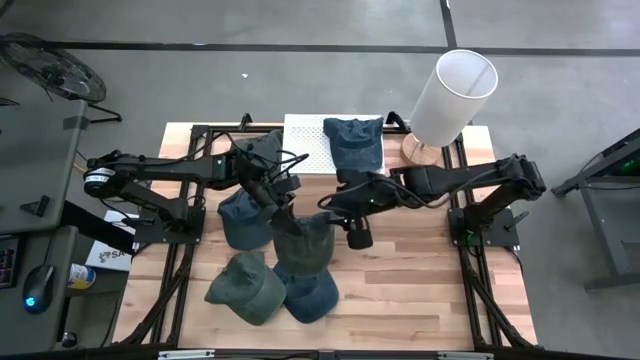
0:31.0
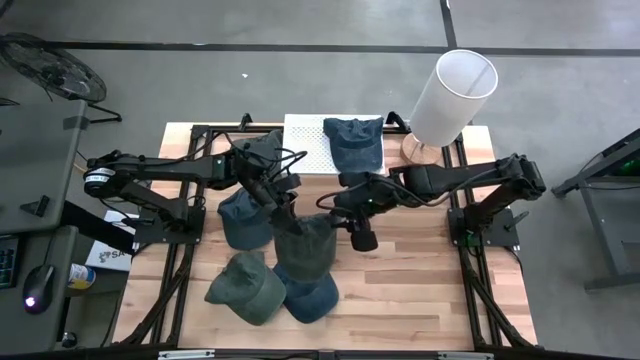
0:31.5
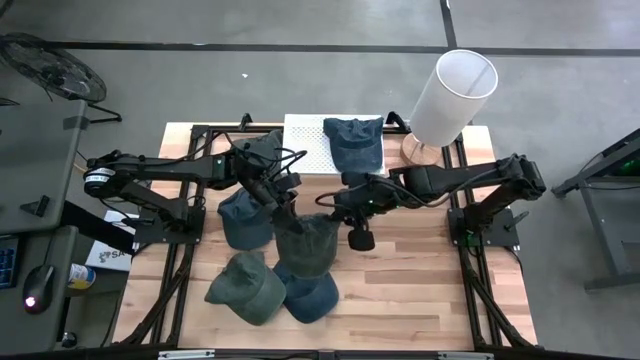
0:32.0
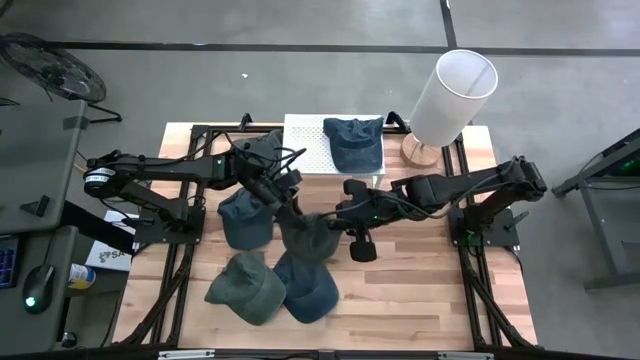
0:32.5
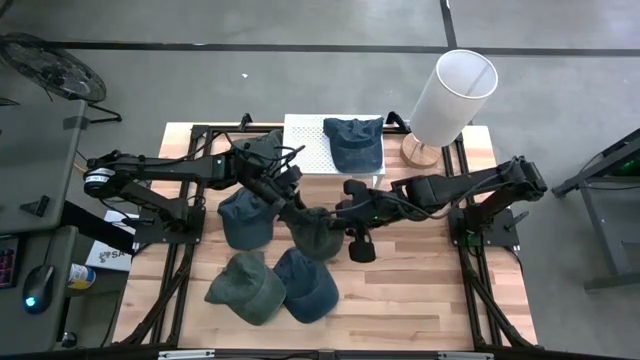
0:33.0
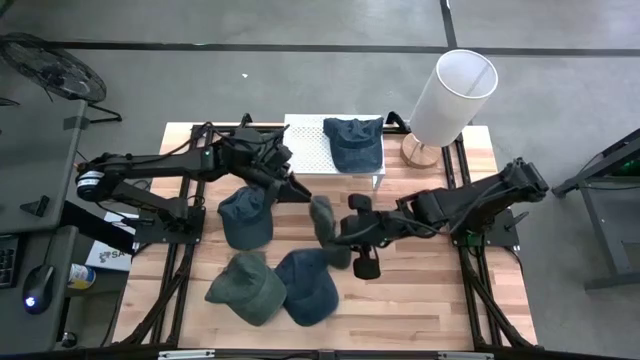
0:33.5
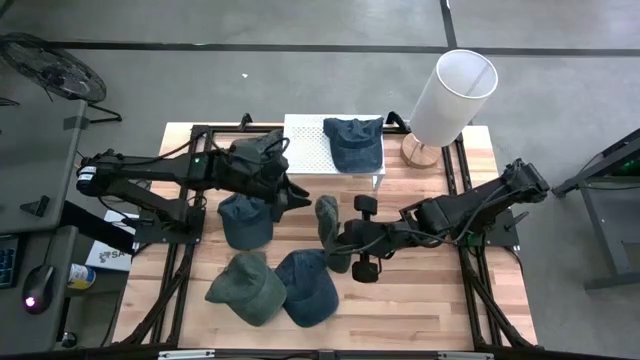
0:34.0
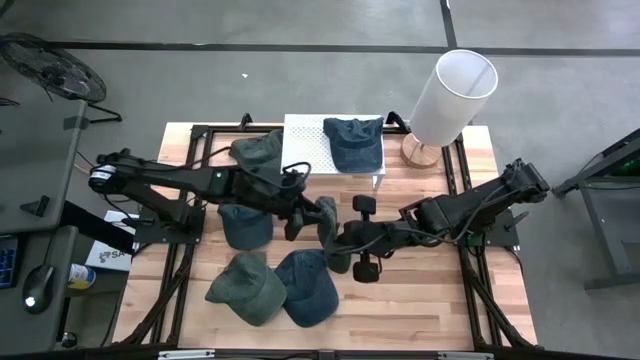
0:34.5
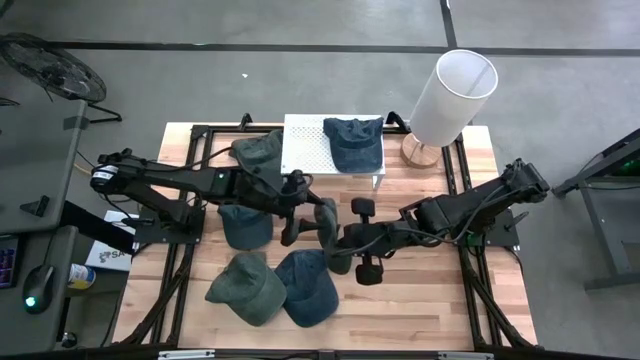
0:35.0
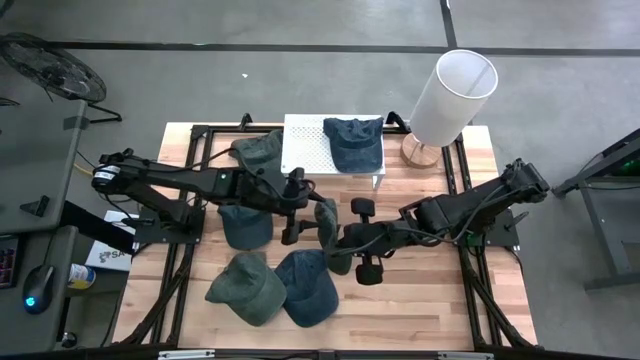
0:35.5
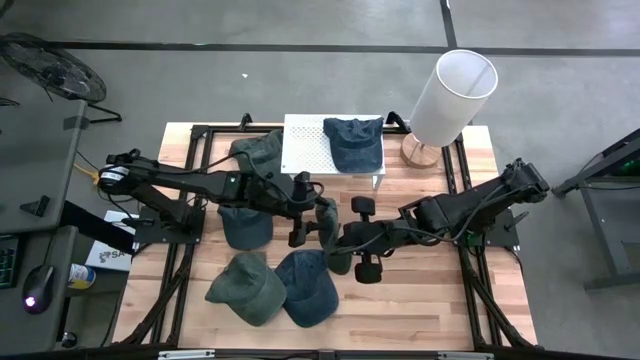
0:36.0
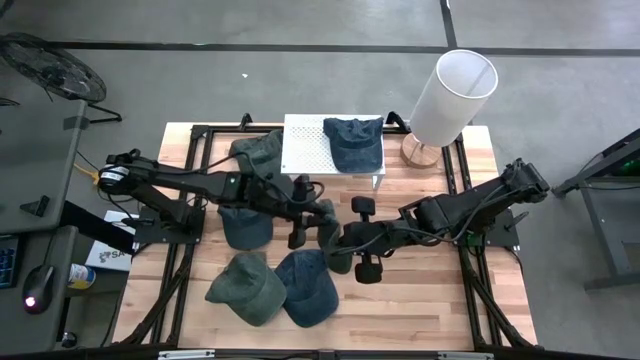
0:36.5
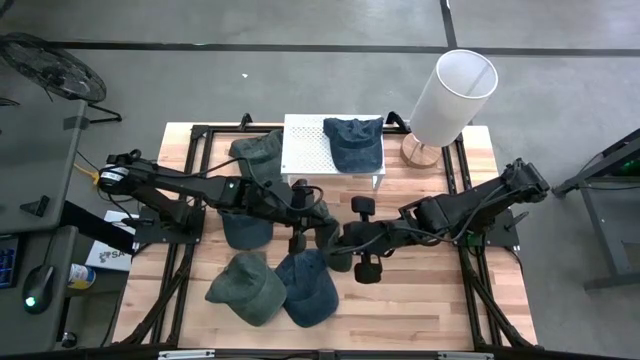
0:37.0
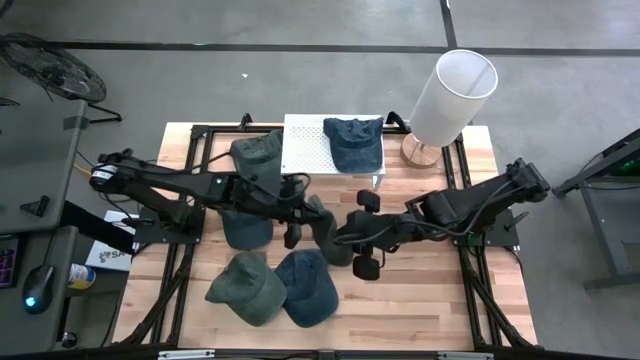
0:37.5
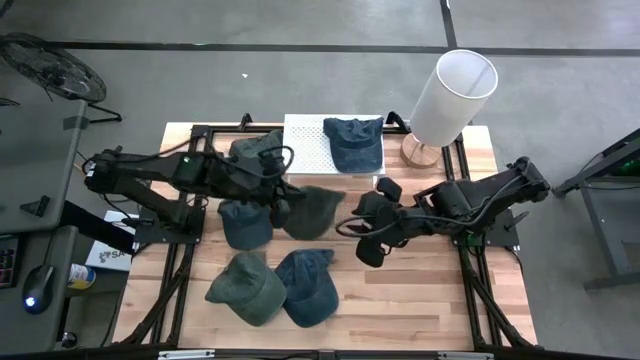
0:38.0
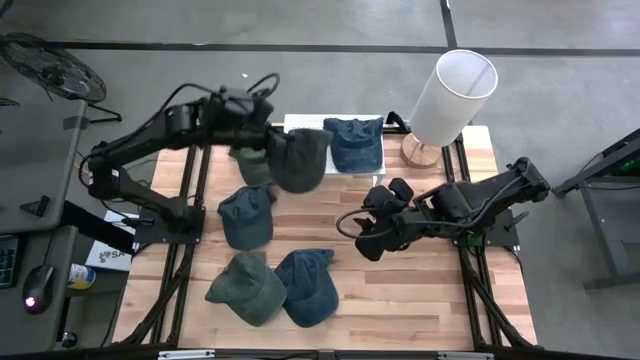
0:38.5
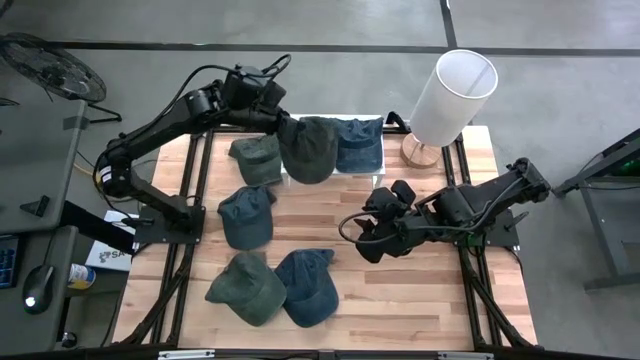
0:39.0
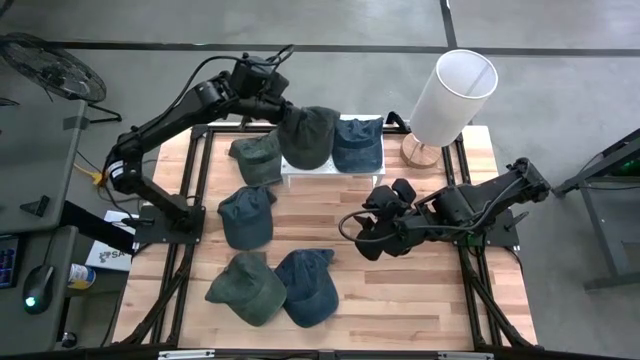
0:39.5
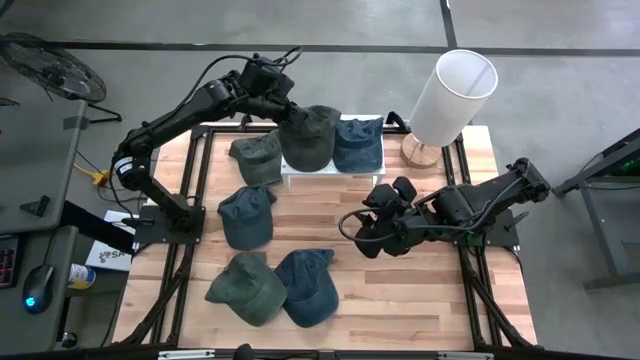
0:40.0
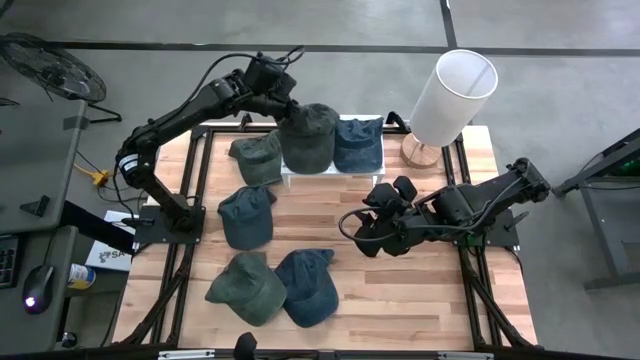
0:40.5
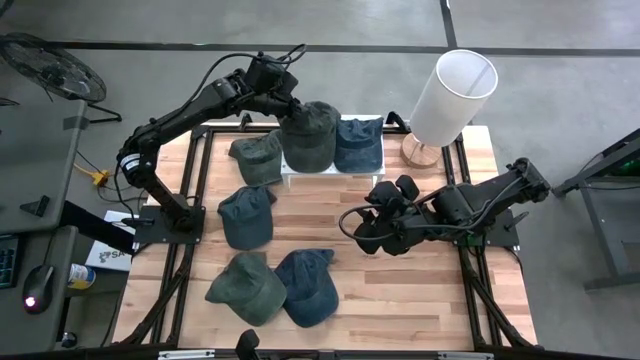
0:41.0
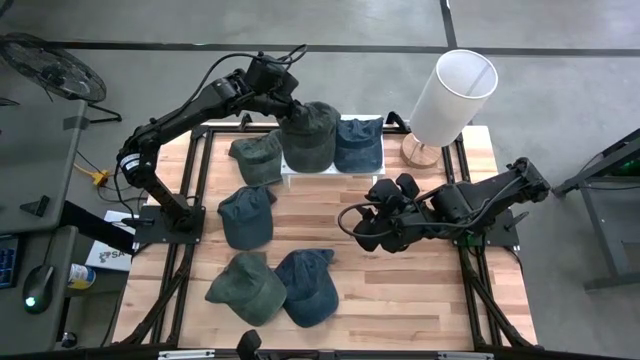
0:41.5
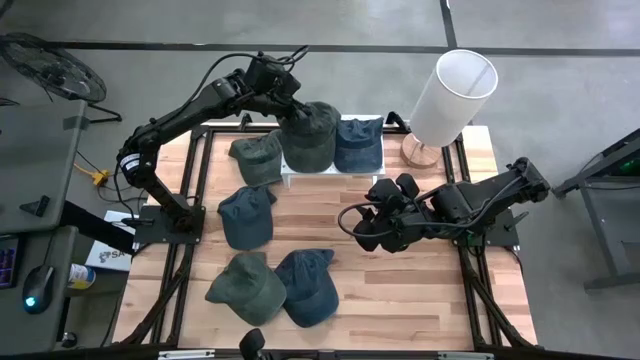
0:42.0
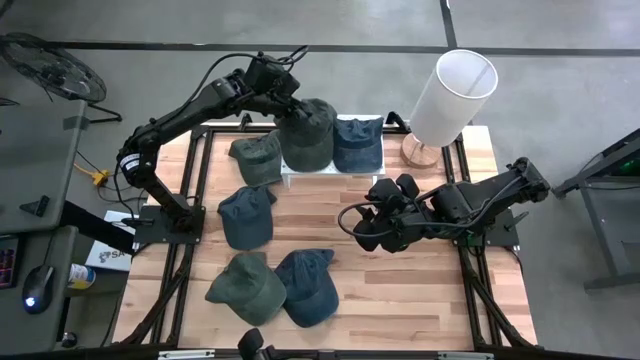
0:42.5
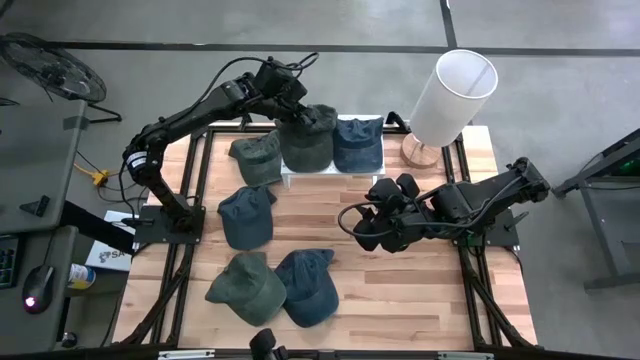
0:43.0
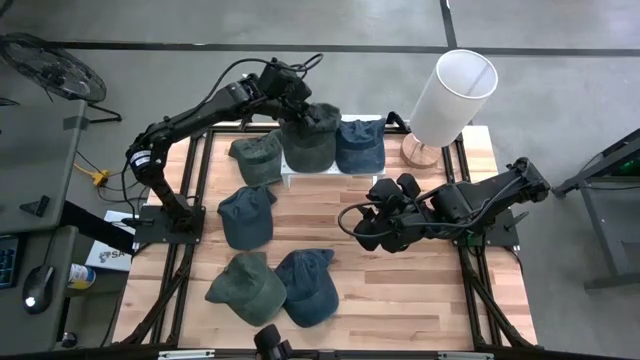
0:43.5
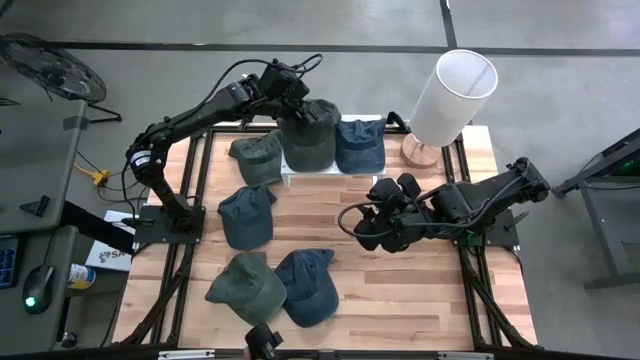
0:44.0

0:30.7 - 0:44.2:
Task: Pick & Place hat
Put the dark green cap on the shelf

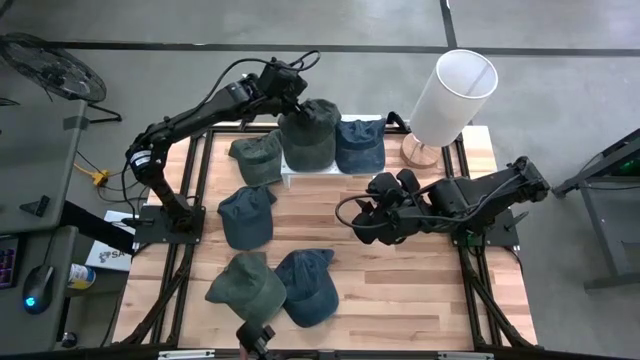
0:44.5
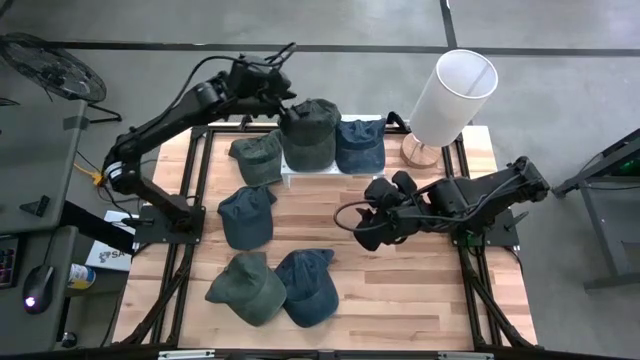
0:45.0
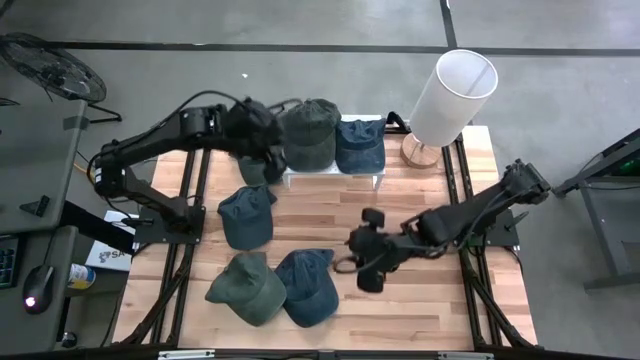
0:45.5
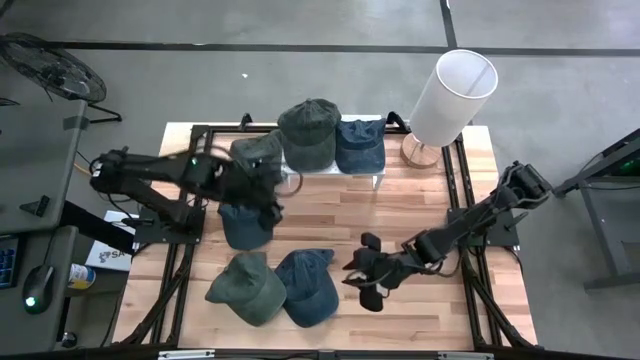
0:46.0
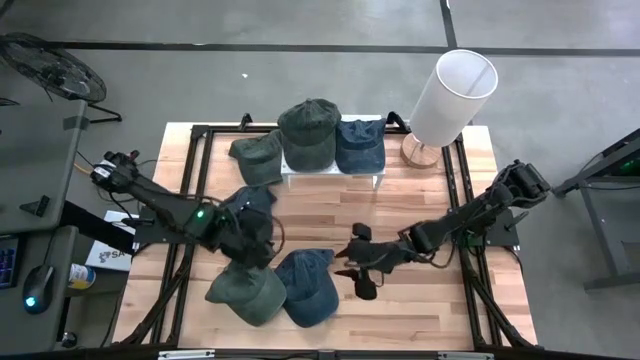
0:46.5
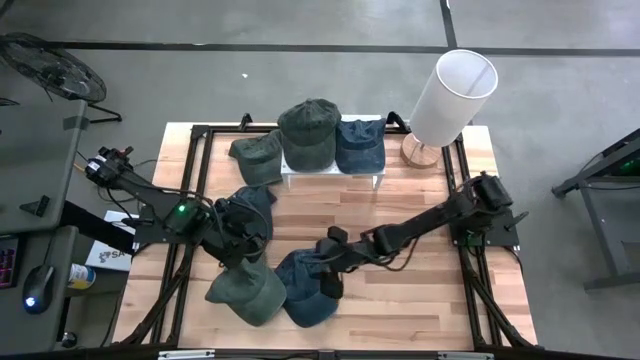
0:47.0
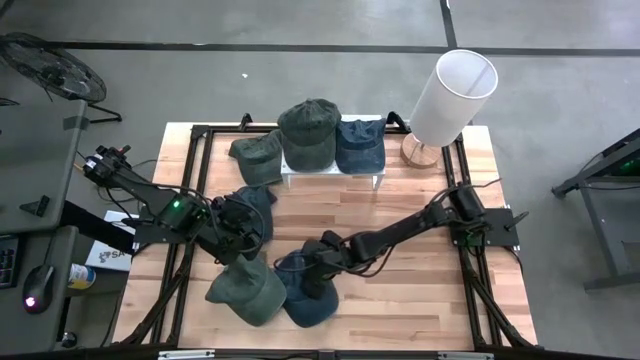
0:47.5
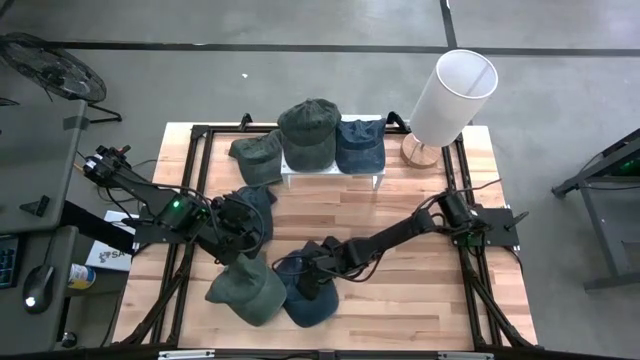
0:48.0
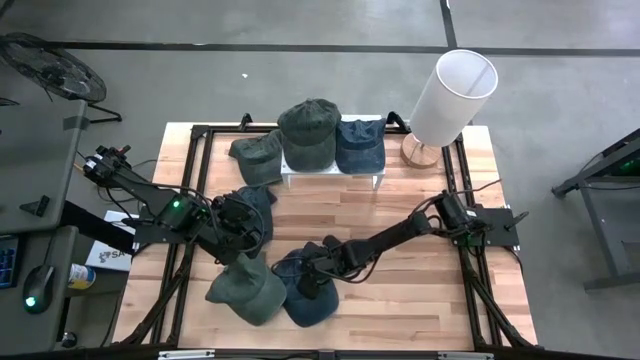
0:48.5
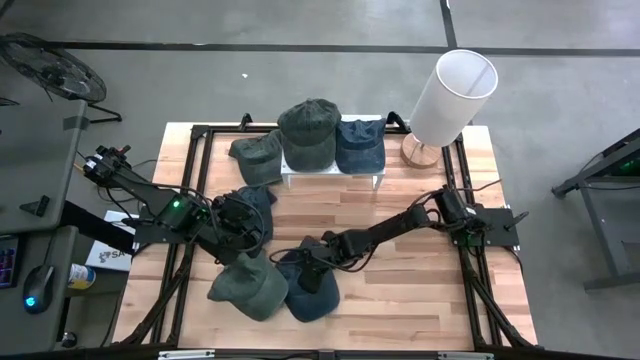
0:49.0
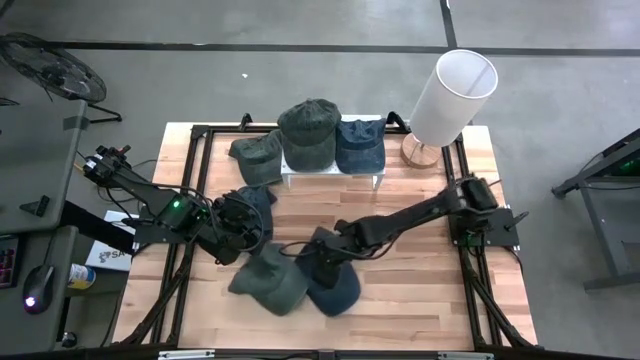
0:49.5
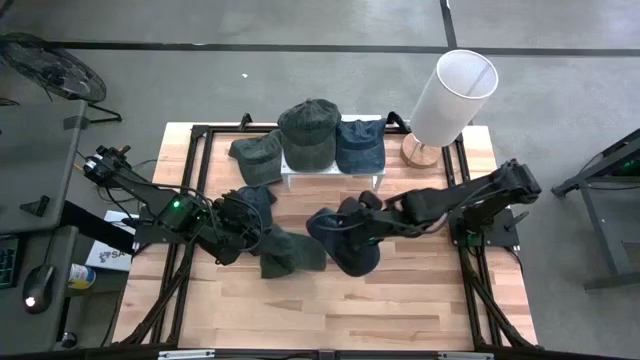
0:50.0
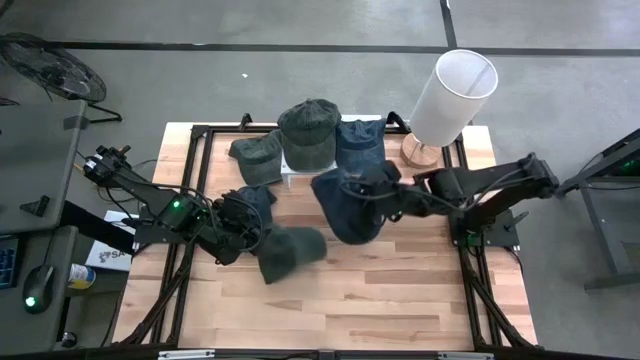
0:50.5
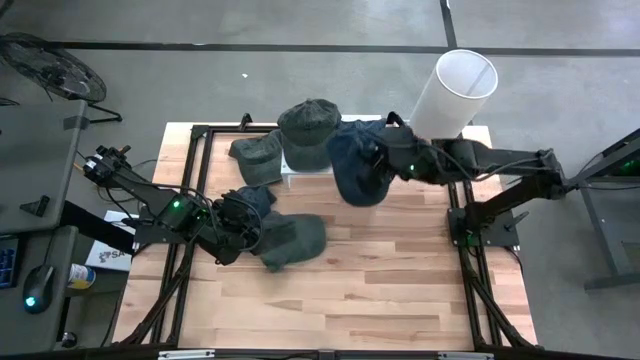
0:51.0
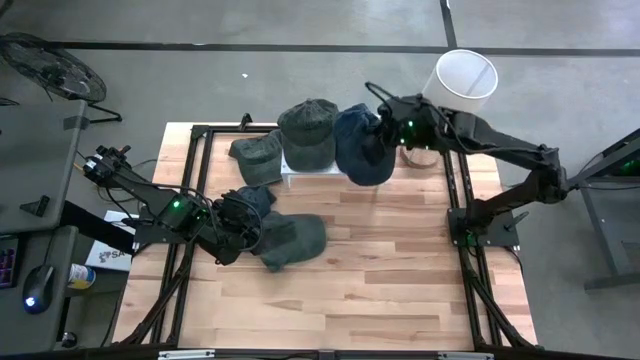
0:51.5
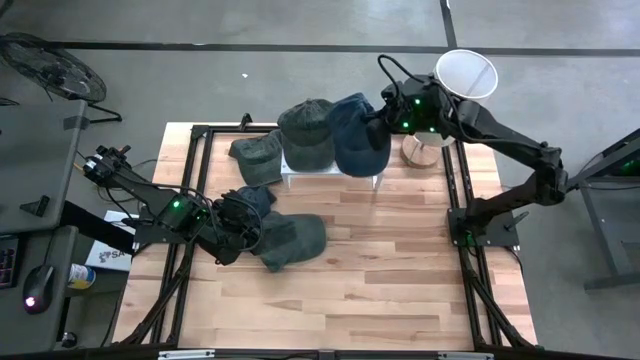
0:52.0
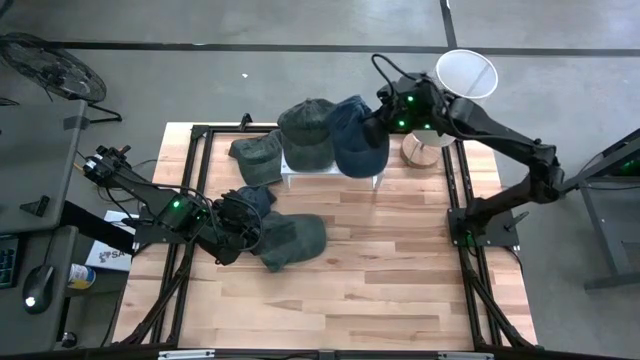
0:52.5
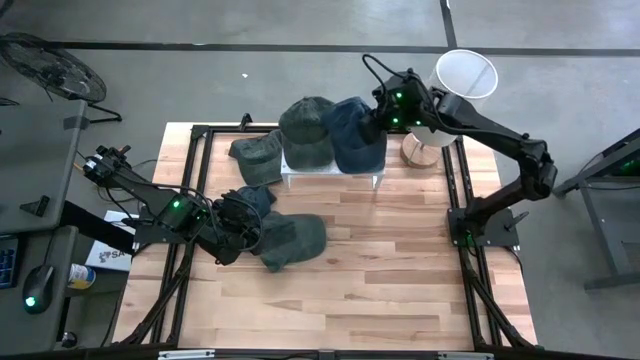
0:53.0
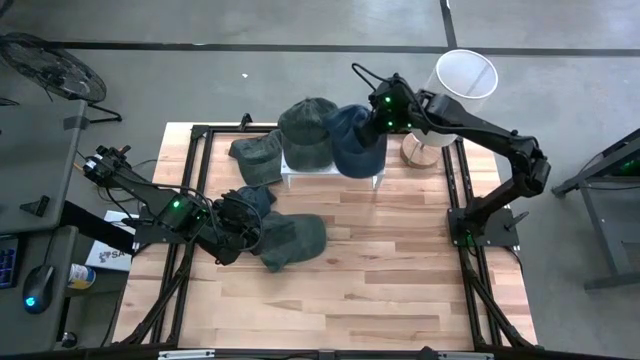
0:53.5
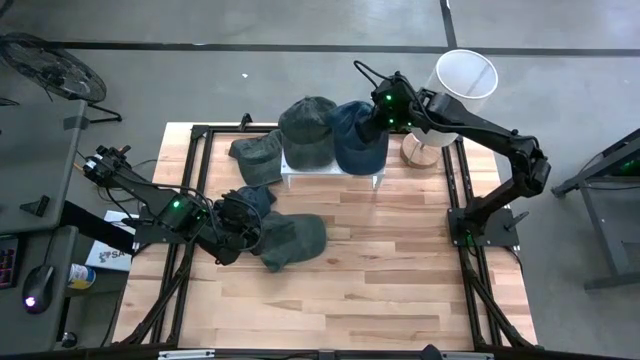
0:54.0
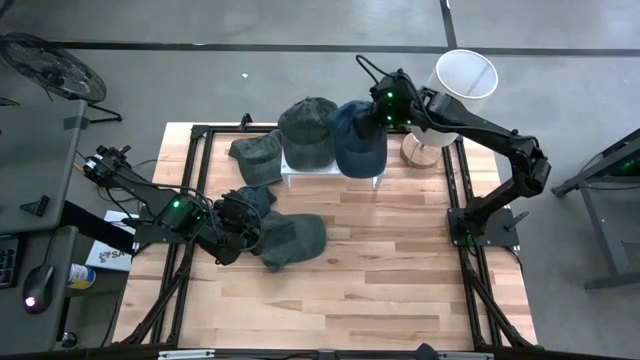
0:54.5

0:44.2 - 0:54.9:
Stack the dark blue cap on the dark blue cap on the shelf
